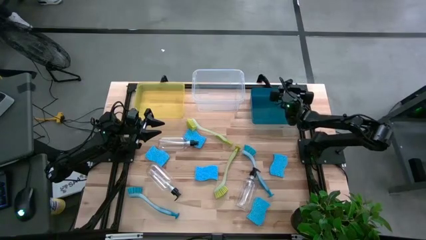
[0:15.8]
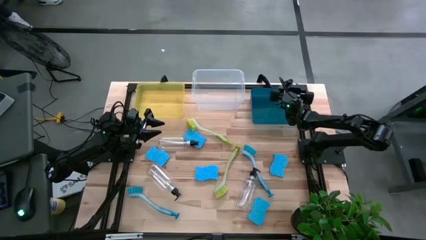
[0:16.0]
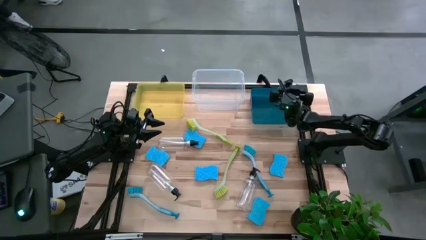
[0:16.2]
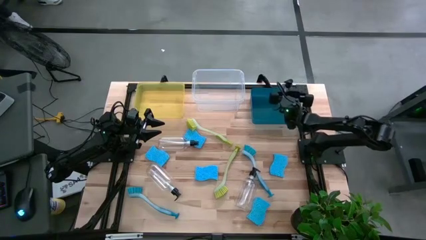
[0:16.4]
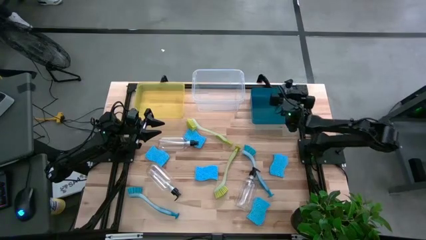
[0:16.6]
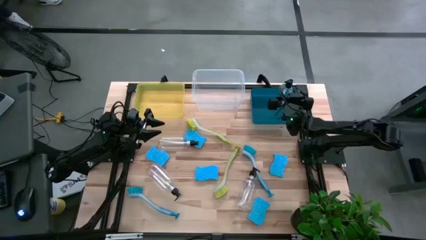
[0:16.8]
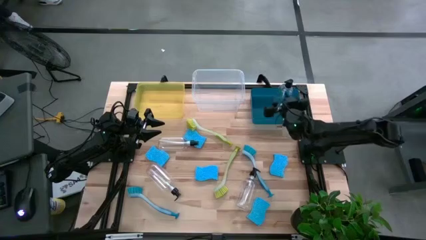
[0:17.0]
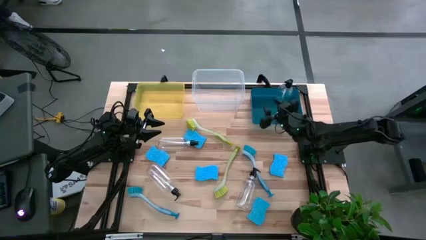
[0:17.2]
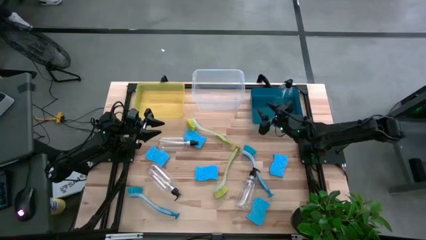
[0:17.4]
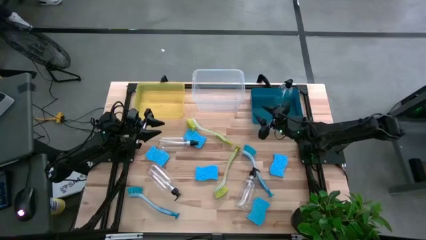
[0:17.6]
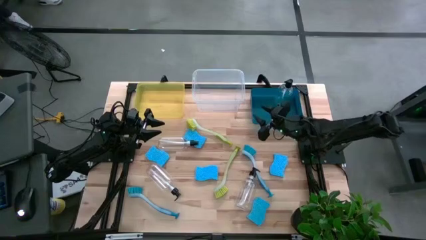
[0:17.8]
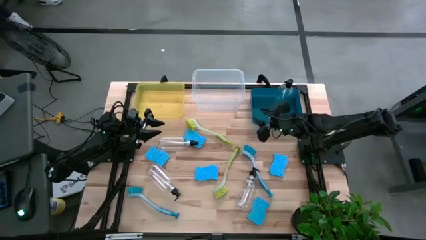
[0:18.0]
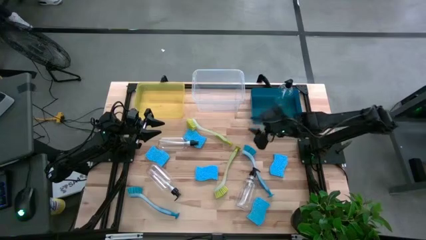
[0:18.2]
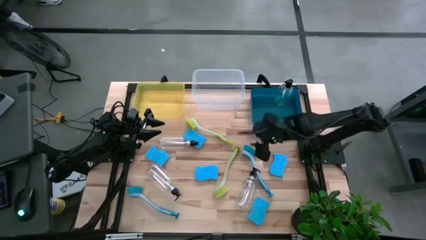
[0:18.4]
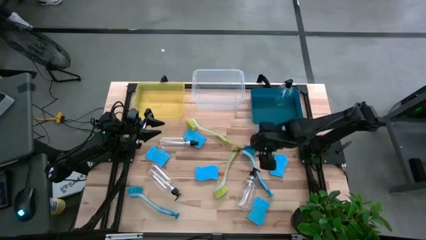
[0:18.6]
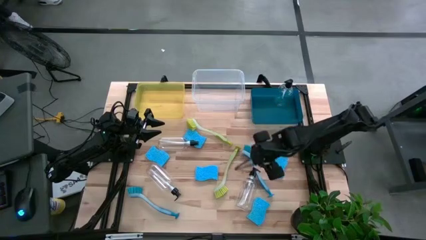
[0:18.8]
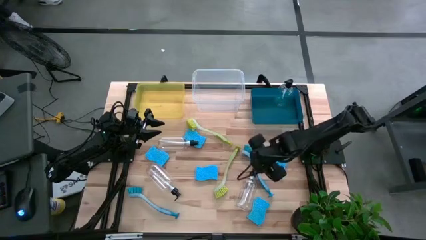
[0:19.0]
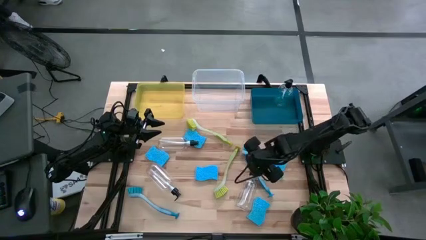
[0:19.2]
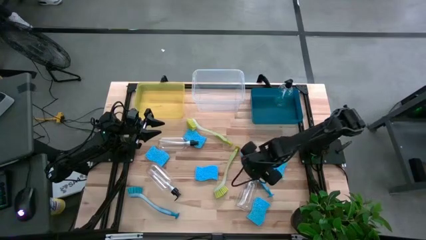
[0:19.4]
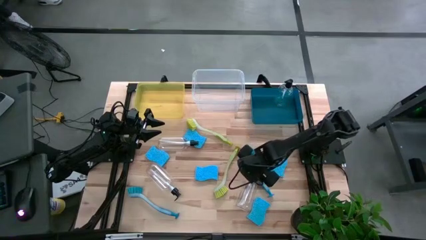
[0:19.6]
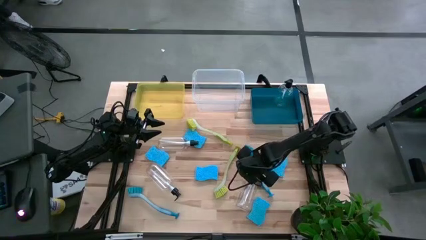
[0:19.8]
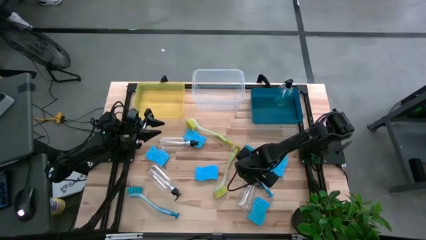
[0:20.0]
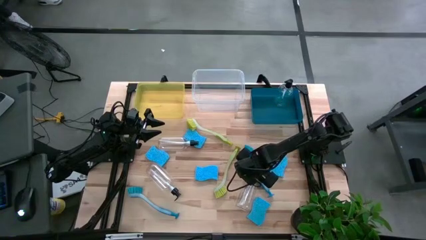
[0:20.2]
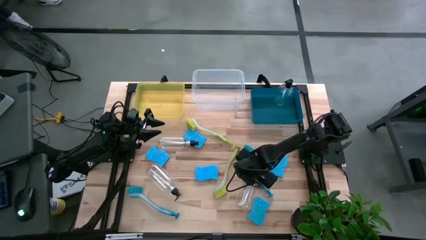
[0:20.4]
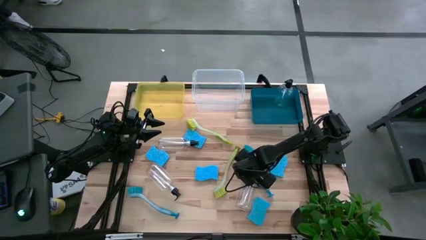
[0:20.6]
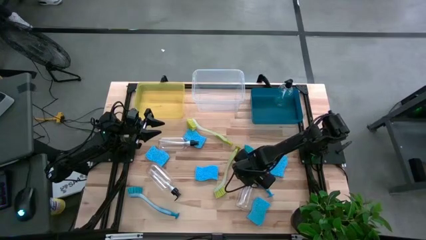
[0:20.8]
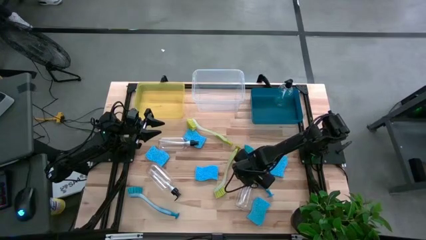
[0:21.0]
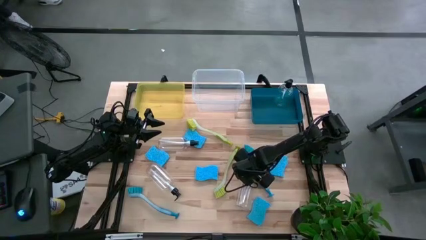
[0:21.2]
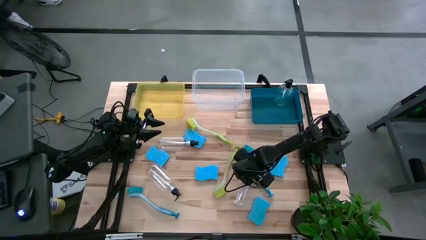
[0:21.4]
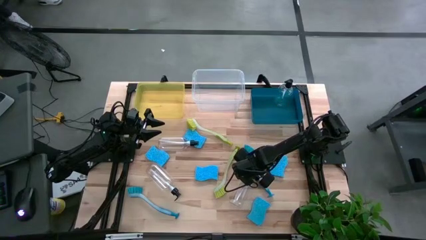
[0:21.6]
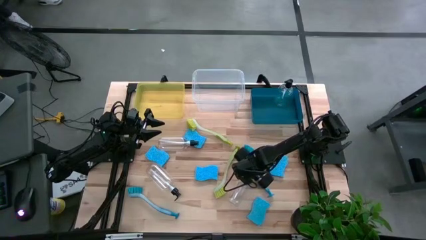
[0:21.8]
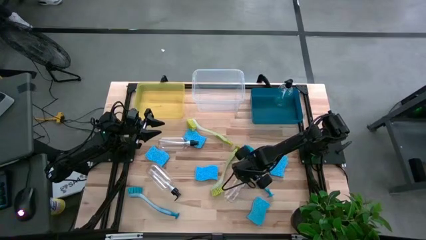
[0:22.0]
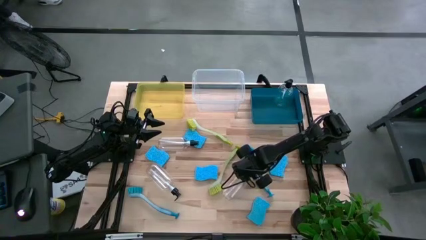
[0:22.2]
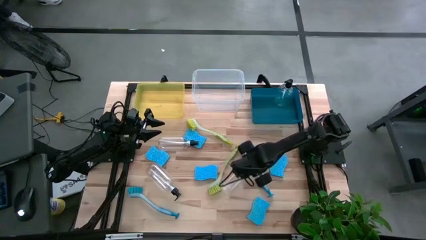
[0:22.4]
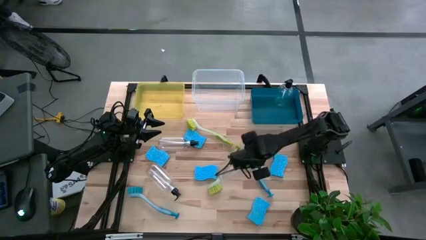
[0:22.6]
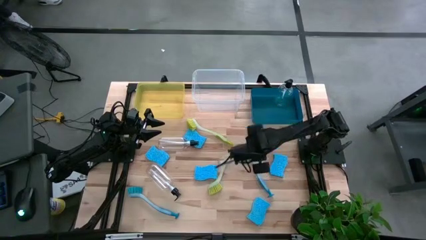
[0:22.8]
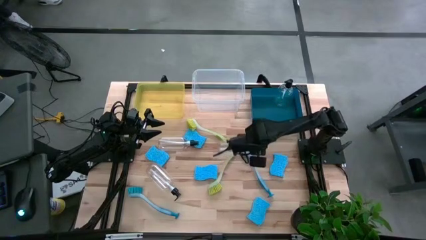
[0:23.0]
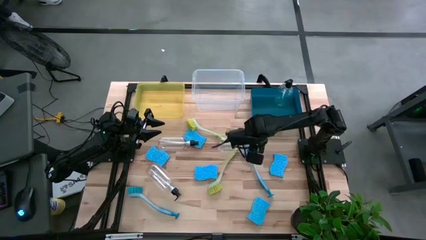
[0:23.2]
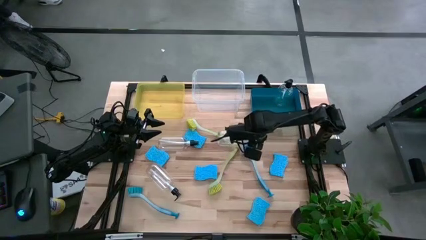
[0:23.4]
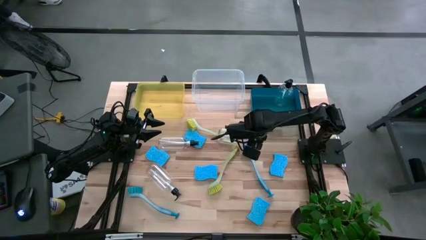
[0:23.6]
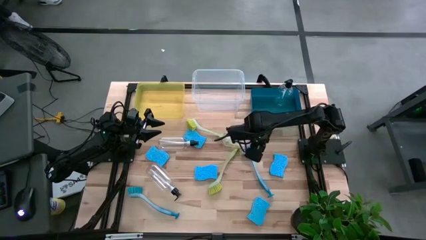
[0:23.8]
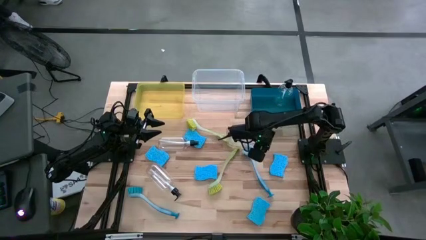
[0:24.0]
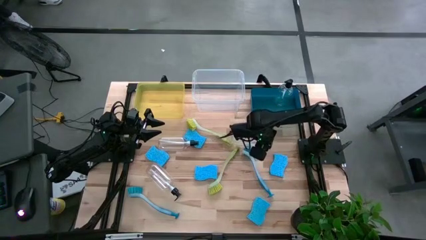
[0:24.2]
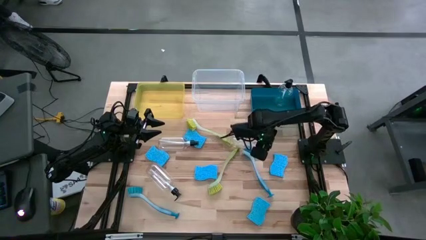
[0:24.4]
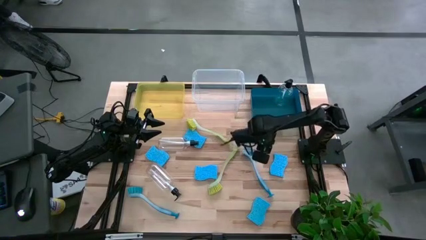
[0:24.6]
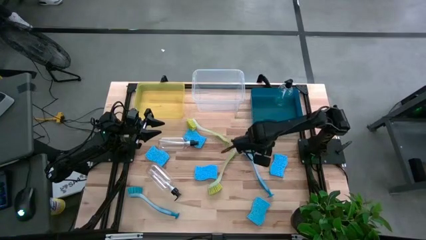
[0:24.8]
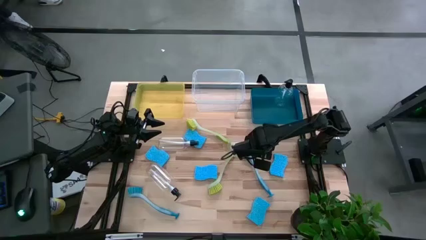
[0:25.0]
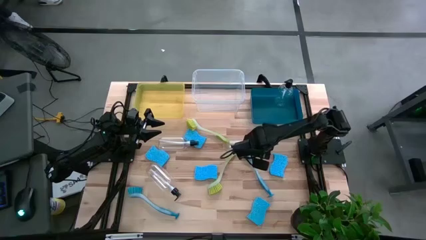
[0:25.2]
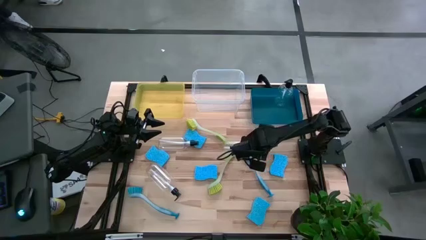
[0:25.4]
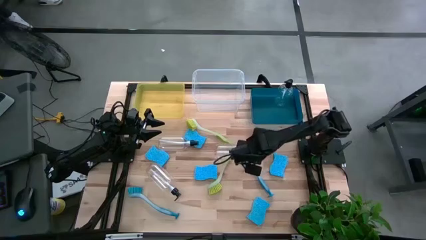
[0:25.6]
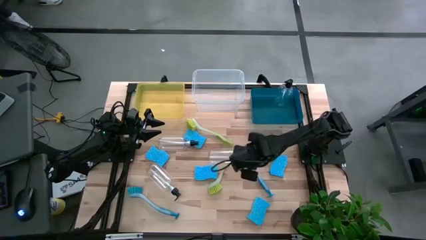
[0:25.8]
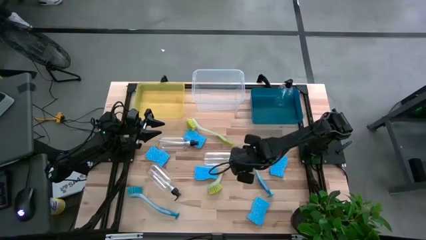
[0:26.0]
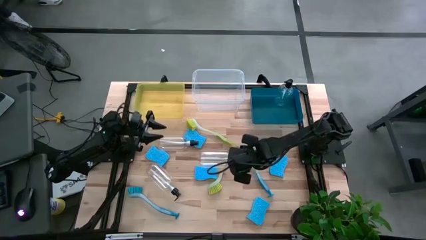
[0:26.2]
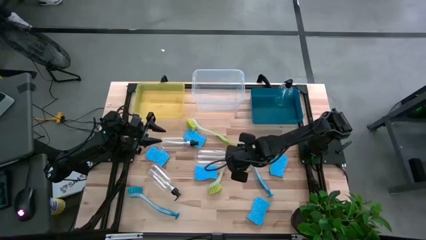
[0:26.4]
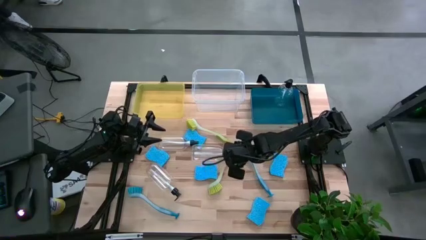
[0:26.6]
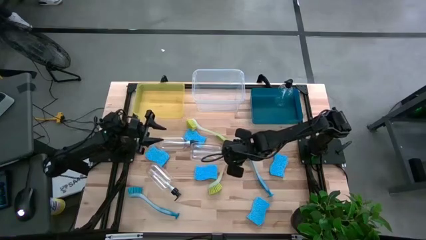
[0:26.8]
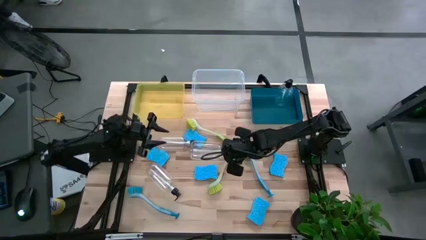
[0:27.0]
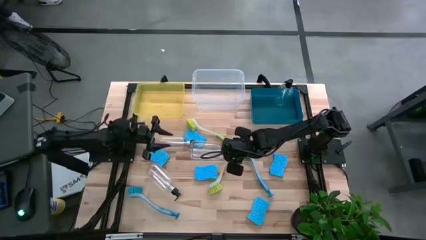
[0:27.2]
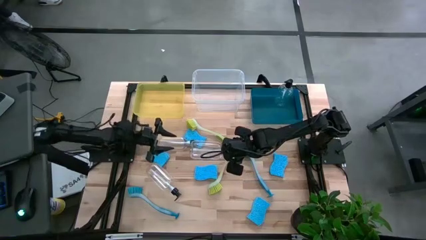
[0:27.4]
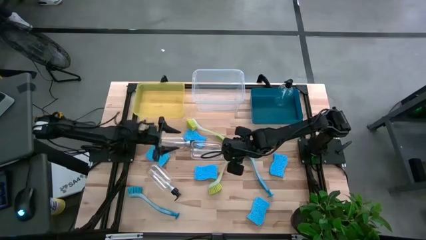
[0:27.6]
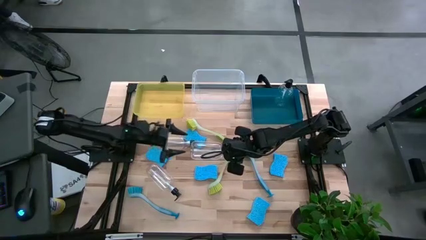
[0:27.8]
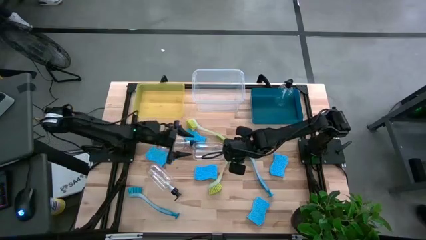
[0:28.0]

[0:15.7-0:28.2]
Task: Pick & Place Kitchen Sink Supplies
Put the transparent spray bottle into the blue bin

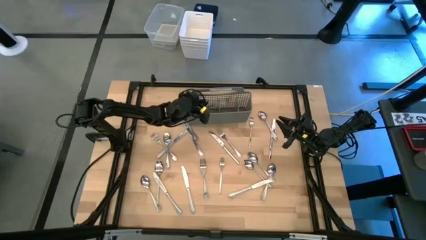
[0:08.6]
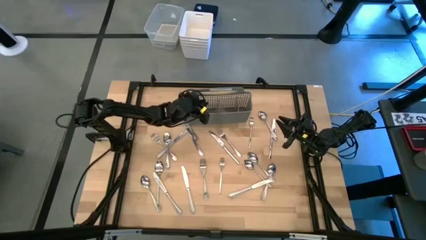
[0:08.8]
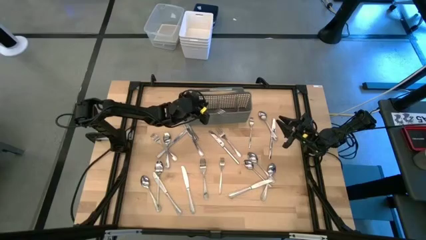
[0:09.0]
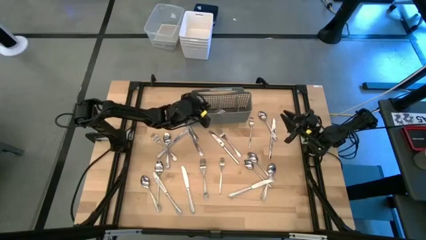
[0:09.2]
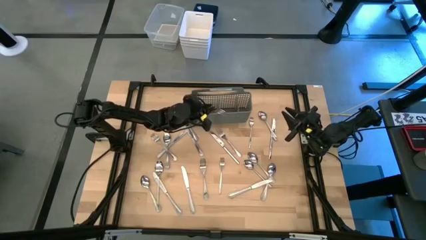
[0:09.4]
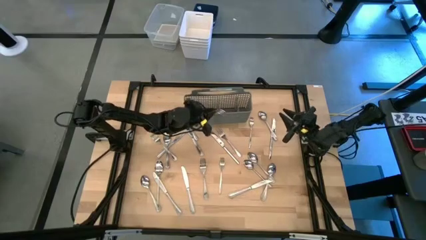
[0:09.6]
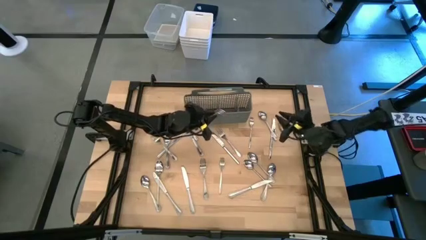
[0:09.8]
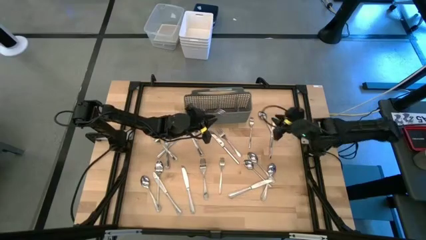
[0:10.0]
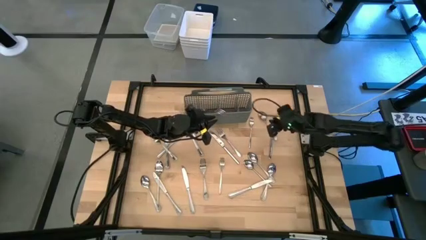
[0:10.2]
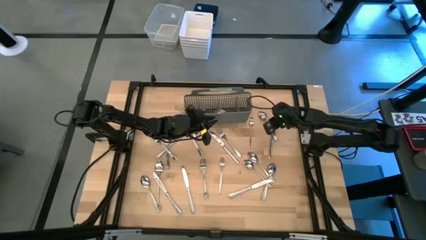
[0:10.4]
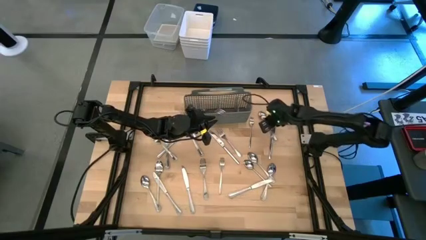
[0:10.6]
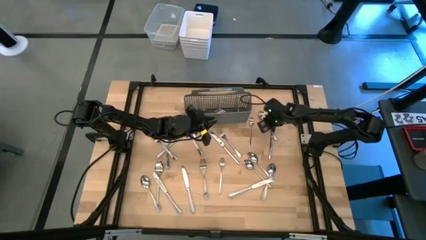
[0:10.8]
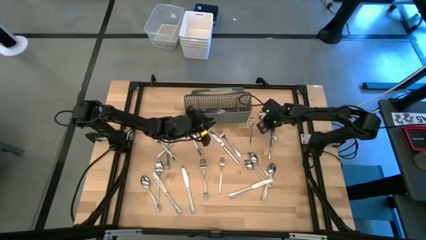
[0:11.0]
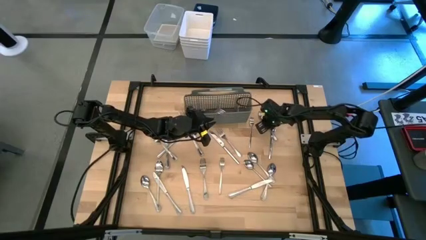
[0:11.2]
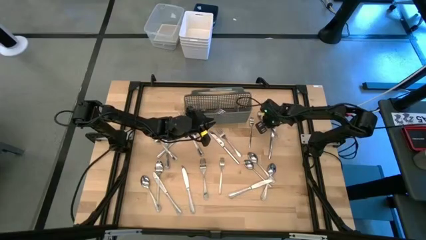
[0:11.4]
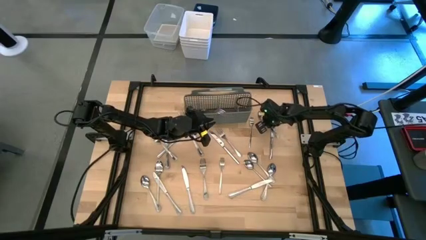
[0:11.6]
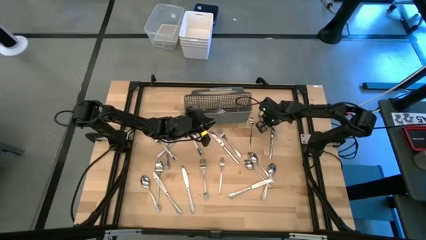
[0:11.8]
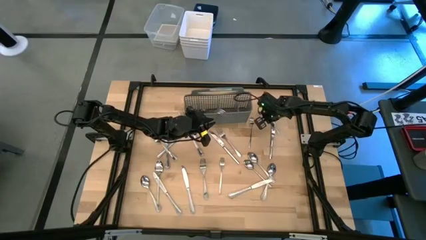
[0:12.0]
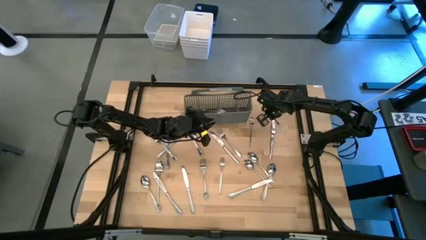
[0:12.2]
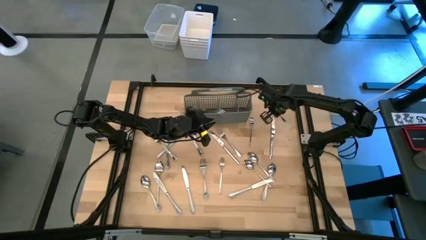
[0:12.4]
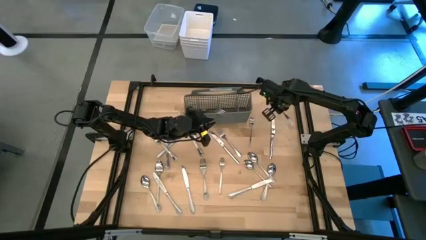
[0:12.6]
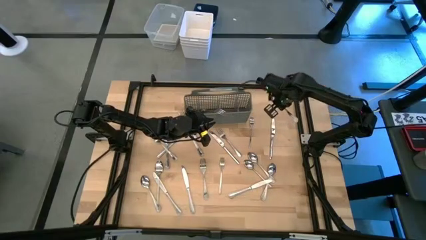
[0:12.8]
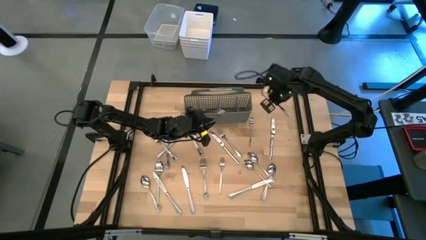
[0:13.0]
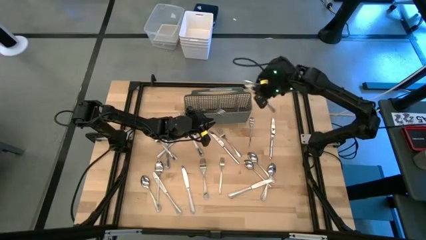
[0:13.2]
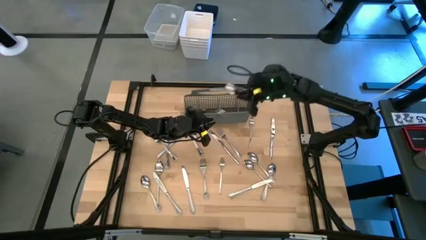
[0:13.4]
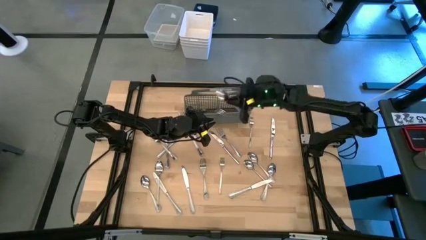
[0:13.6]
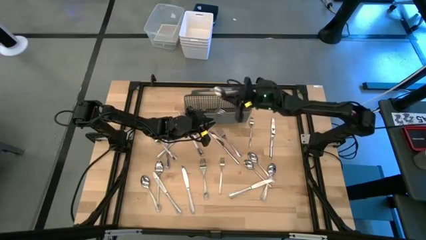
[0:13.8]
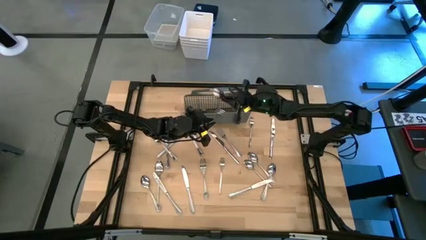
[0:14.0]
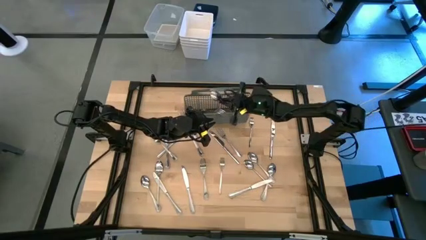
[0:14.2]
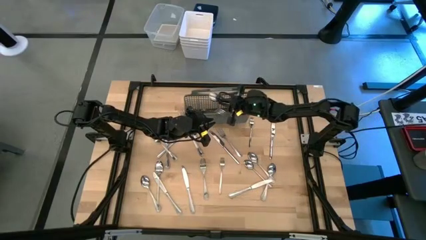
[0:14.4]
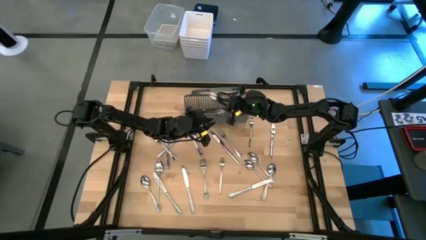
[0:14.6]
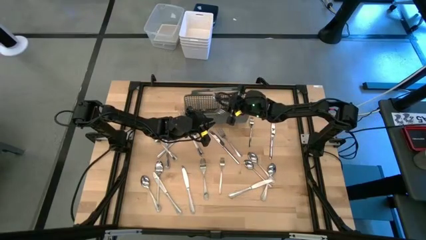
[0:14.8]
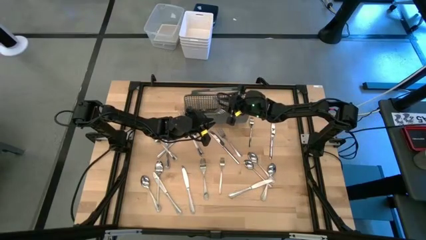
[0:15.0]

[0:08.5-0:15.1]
Task: Sort silverware
Put the silver spoon into the gray silverware organizer
